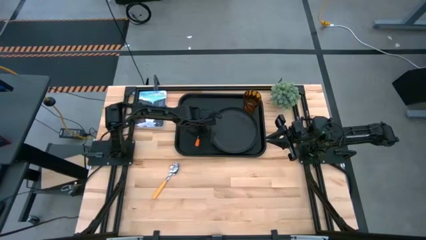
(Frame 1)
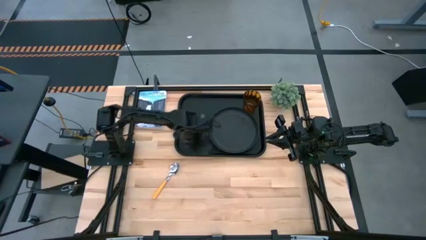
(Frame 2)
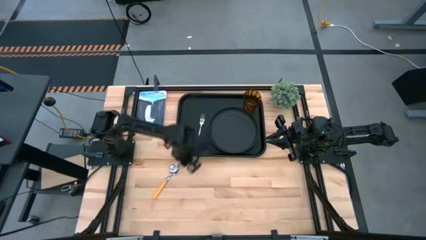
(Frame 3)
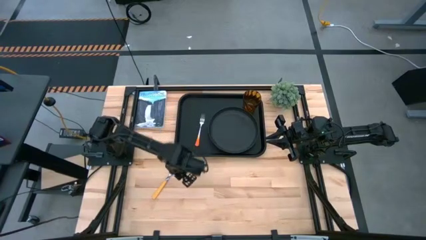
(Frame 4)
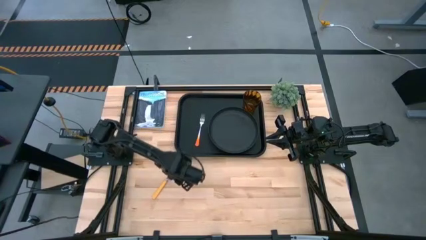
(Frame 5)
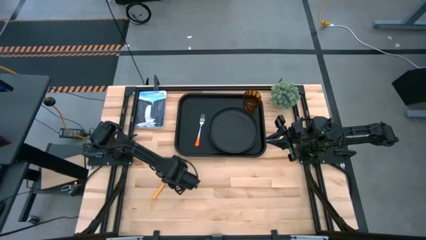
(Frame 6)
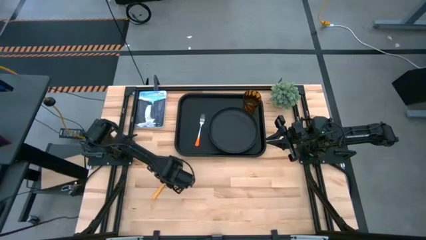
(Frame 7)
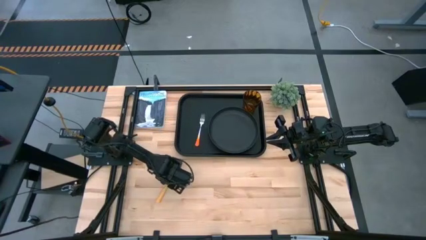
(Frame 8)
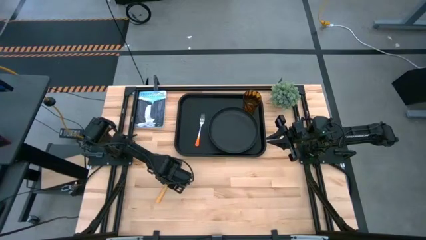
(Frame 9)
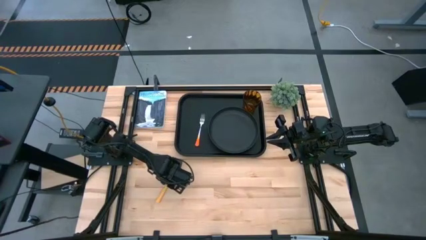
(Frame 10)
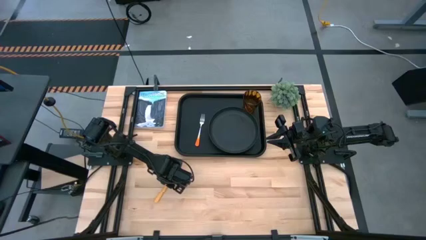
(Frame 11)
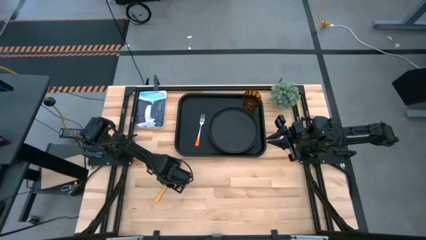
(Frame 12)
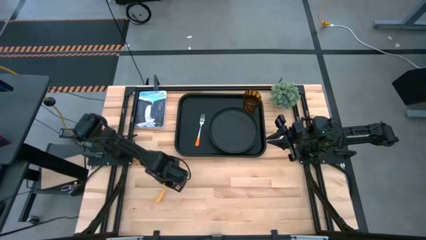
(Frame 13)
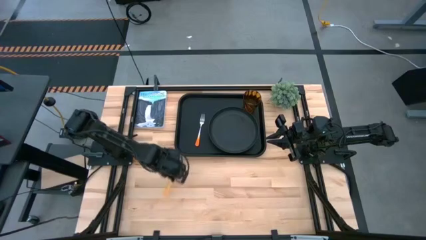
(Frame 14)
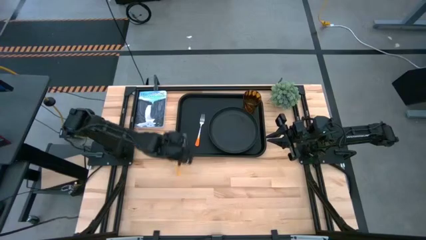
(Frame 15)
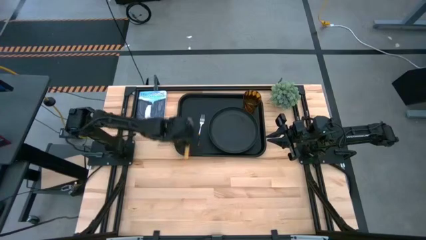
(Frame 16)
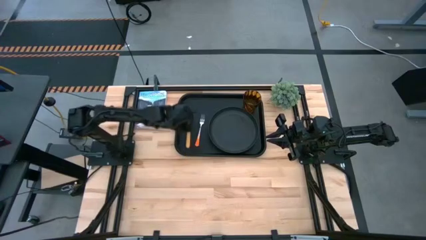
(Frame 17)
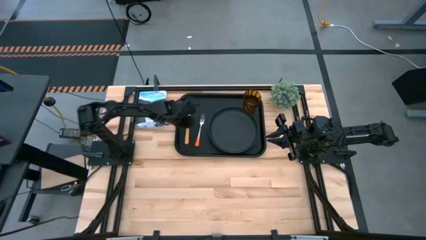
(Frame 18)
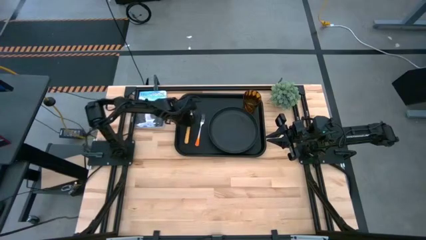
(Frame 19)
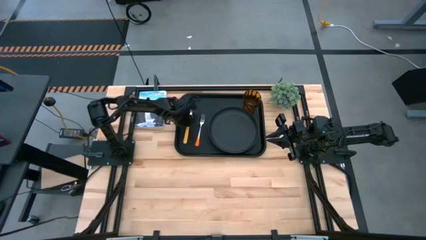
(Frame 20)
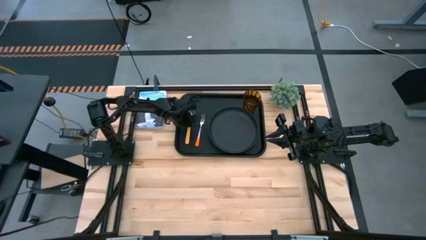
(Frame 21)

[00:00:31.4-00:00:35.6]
Task: Pick and place plate/cup/fork/spoon on tray
Put the yellow spoon to the left of the orange fork

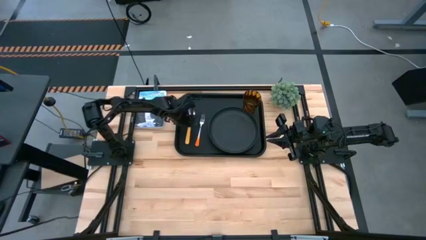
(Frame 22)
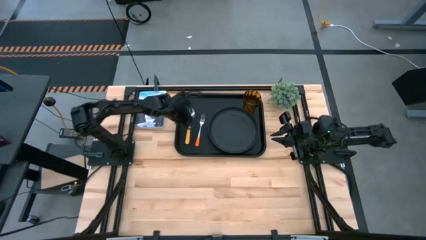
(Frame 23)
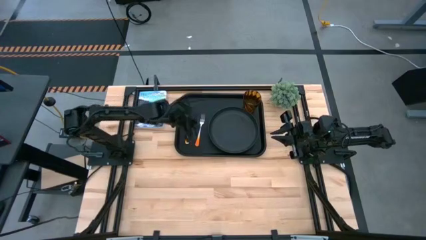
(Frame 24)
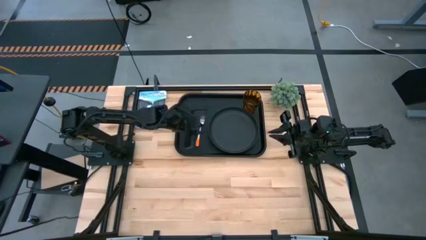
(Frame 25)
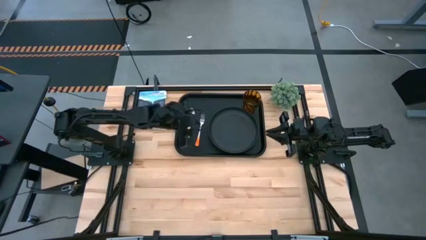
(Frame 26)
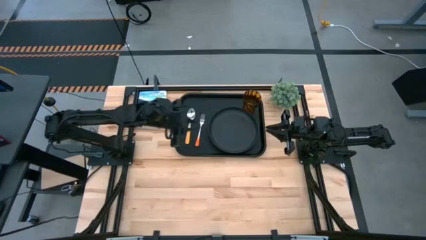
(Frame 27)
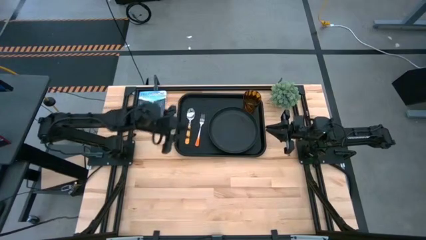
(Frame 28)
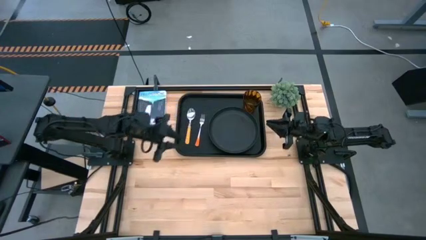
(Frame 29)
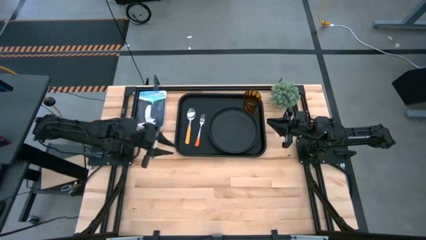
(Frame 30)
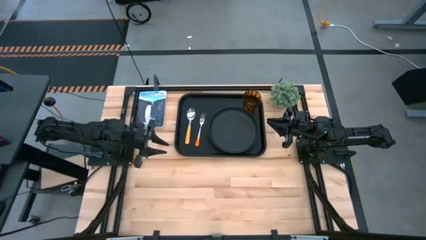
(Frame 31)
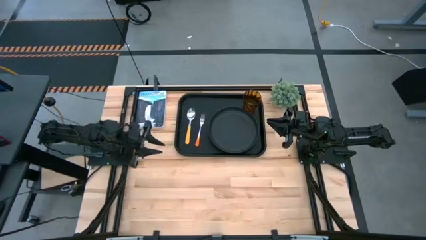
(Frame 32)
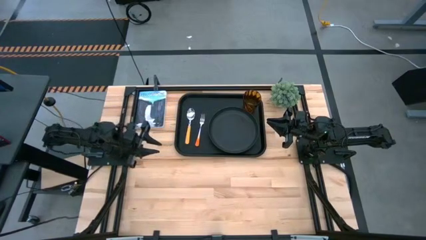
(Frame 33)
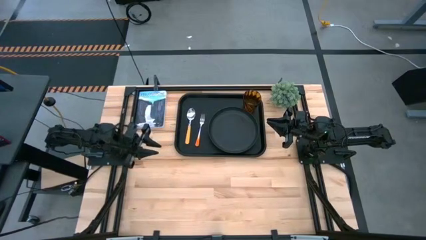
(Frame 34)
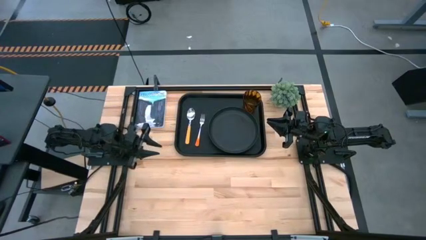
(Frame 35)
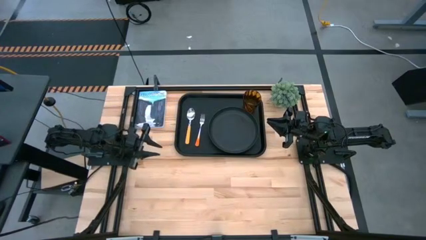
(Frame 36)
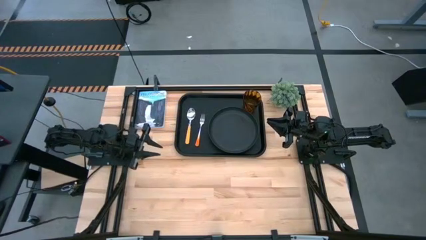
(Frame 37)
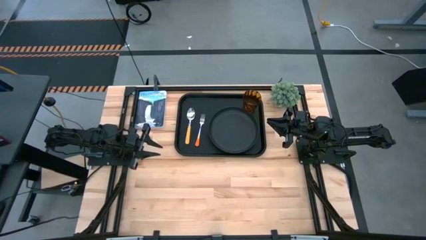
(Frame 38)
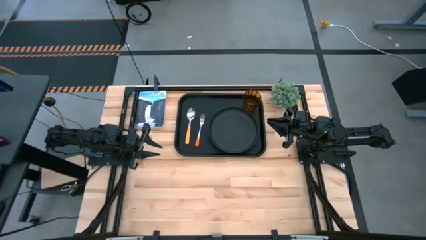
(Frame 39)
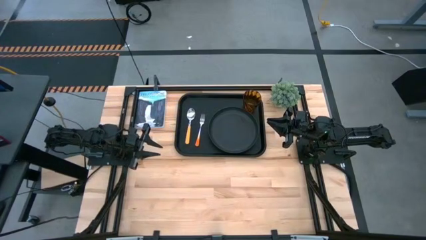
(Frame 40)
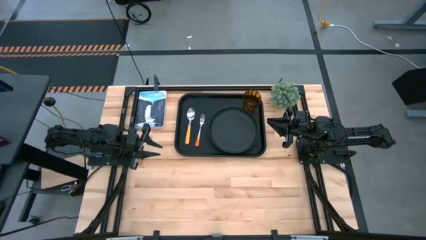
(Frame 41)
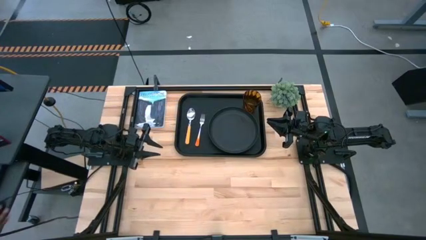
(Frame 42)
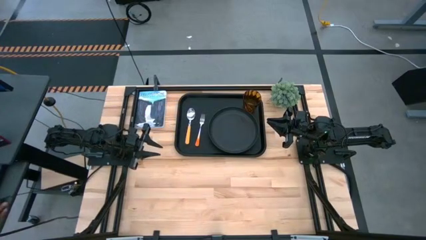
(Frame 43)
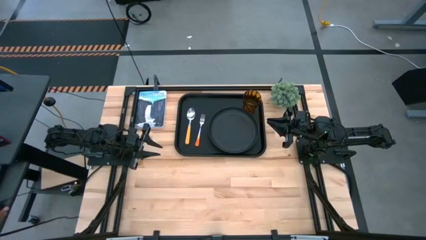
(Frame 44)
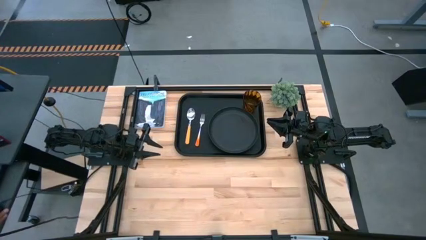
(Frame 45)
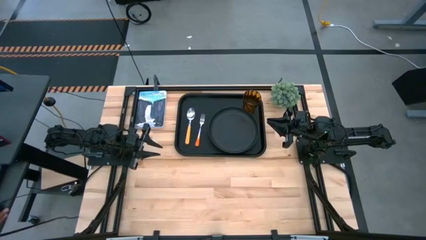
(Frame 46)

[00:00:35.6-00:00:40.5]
Return to Home Position

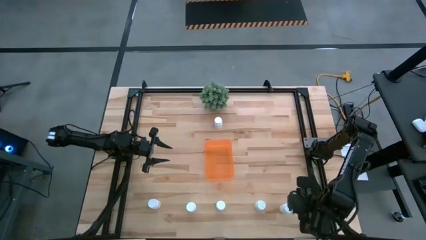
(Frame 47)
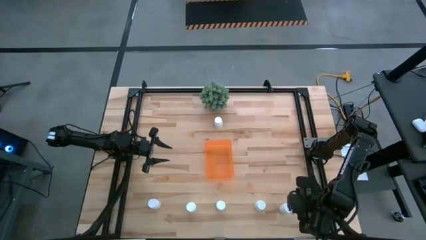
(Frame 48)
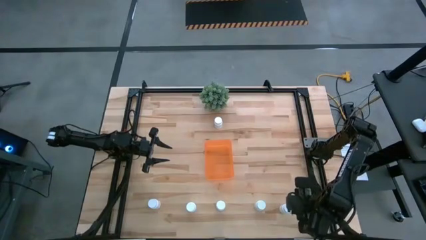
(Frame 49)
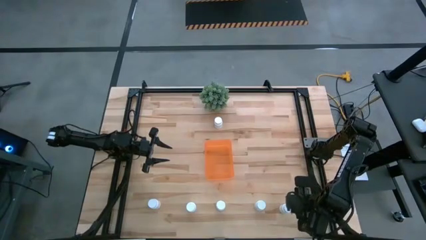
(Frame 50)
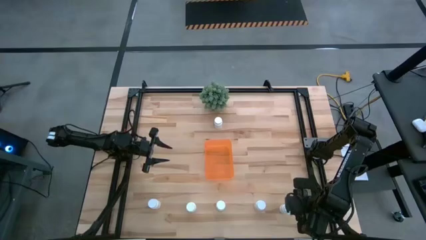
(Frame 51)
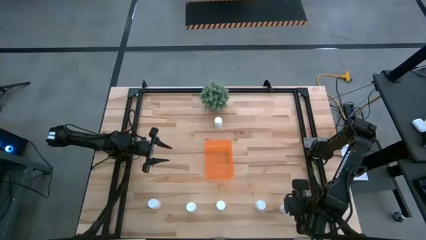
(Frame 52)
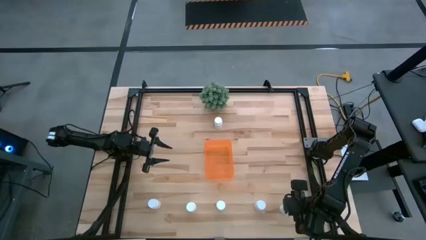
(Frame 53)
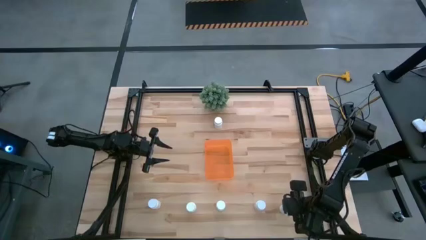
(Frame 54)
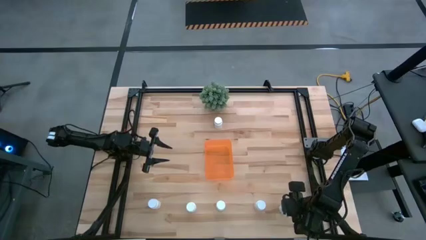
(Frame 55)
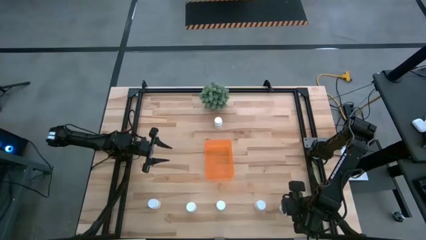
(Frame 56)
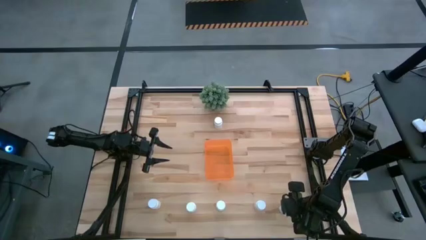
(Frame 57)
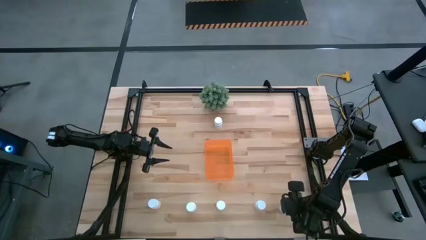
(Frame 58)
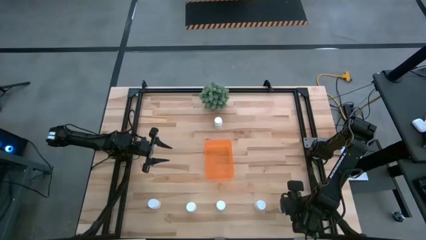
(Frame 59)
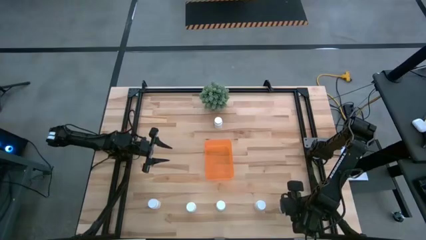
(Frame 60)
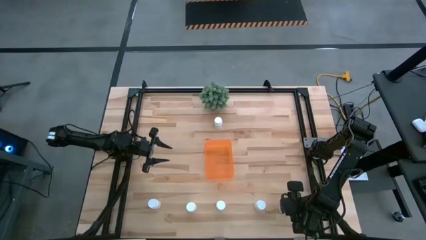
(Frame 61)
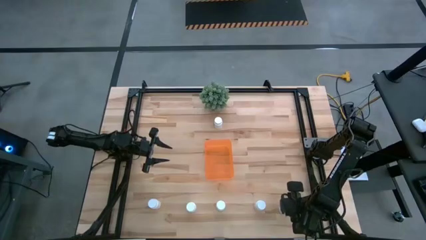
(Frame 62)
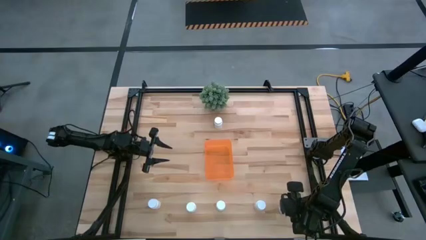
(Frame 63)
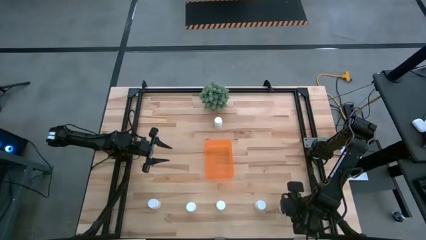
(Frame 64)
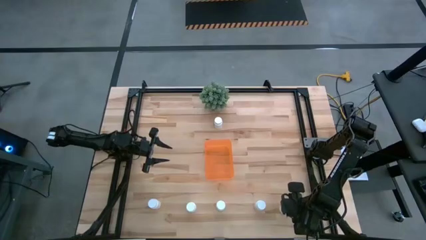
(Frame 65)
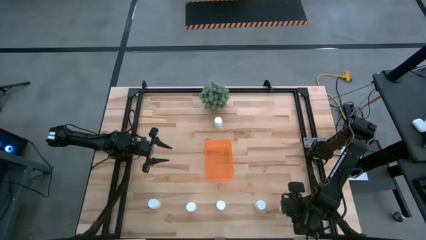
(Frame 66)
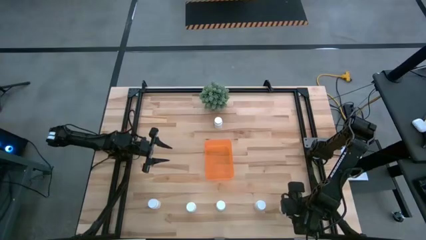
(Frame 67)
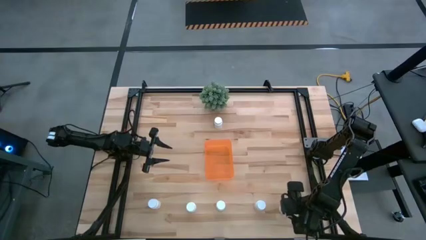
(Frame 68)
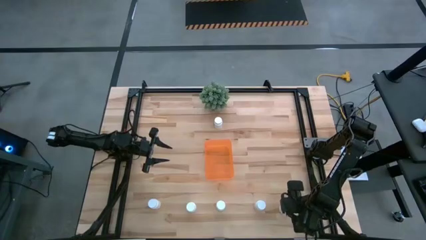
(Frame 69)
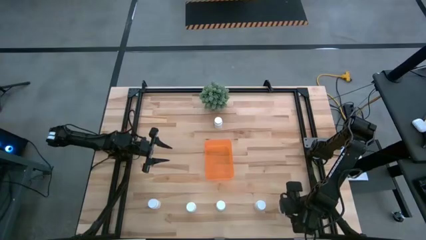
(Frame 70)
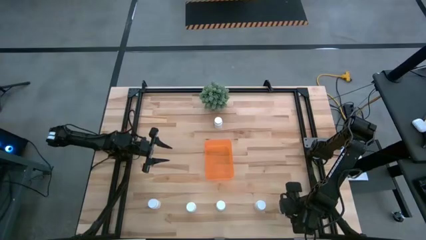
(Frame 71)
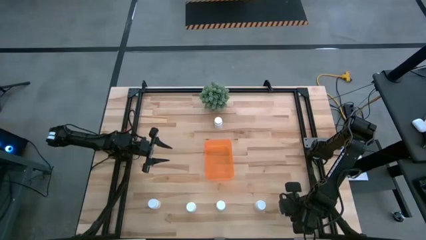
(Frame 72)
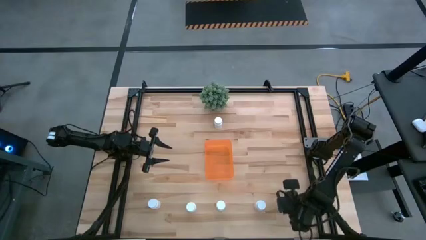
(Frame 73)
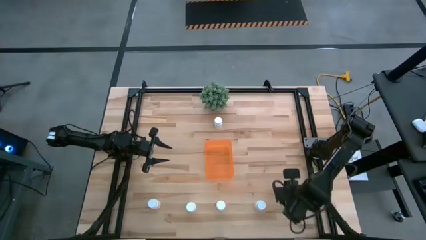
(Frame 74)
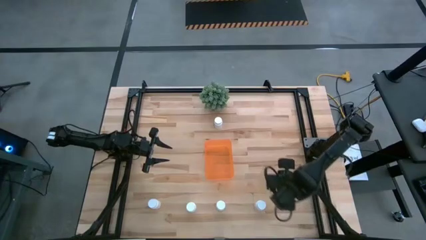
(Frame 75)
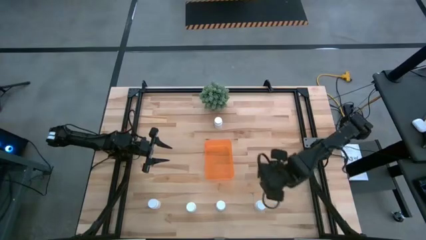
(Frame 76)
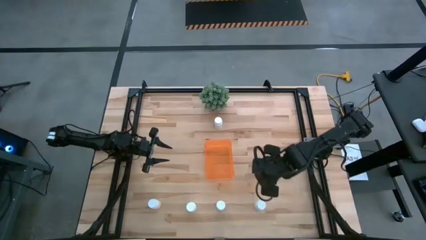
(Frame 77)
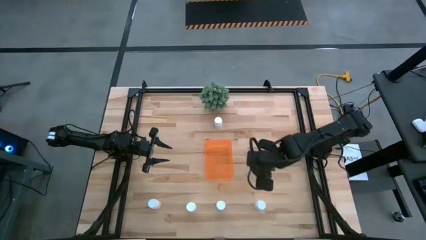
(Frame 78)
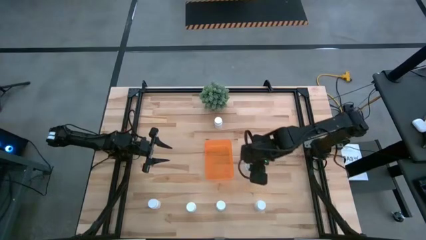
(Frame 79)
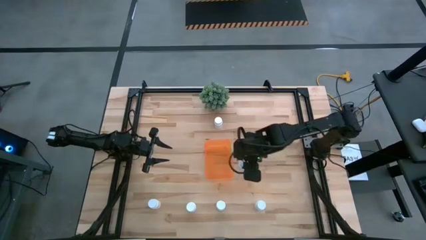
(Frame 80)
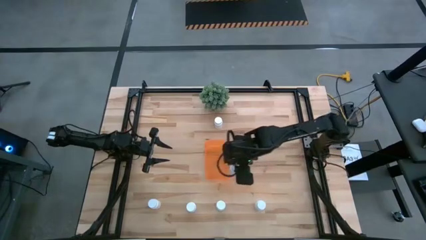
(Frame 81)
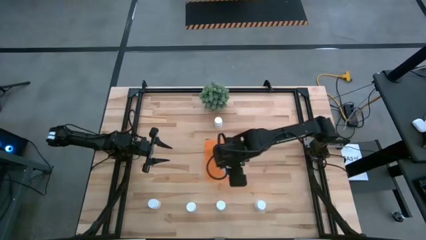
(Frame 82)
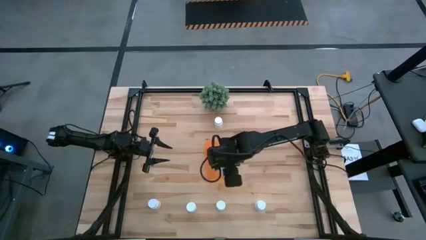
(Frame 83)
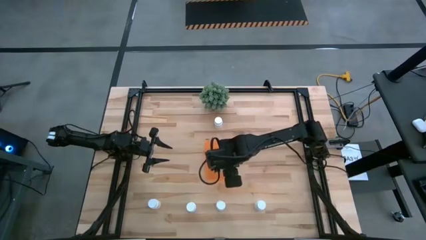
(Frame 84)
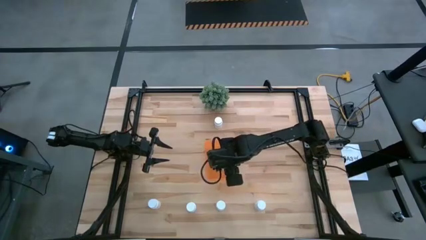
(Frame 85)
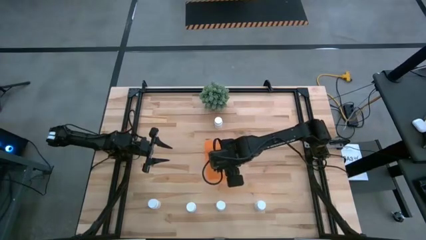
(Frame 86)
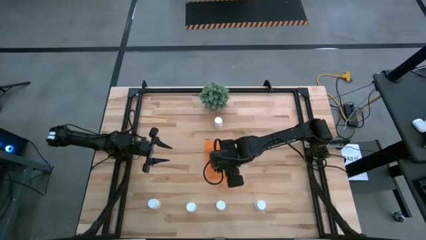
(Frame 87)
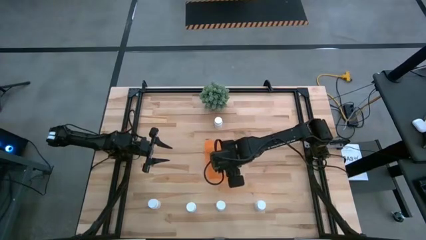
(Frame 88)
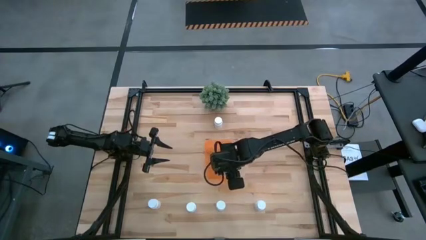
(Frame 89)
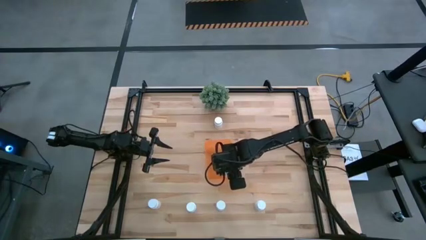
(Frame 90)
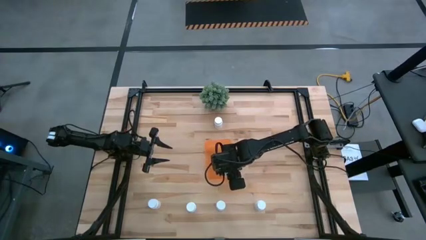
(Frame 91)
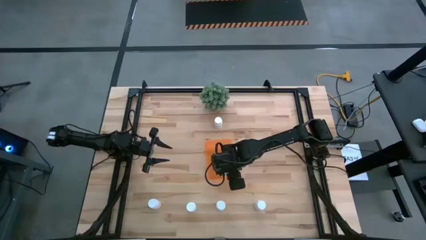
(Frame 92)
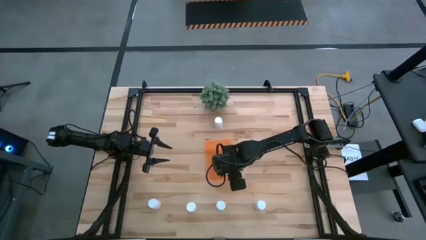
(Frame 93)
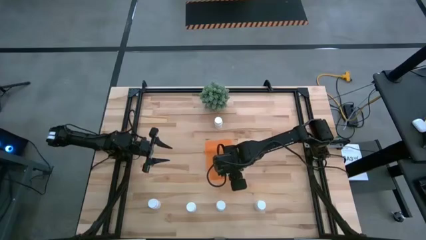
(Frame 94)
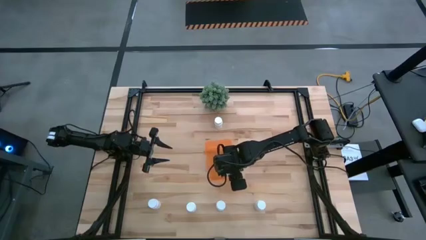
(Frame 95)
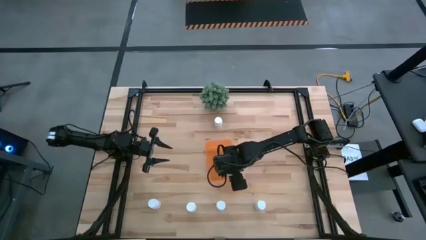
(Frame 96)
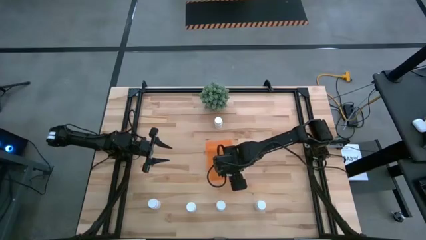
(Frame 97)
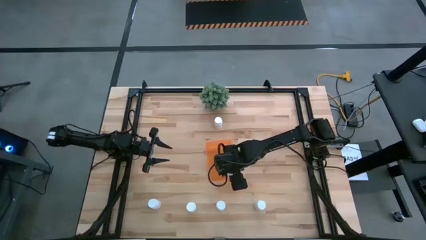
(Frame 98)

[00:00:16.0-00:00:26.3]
Task: Pick and place pill bottles into a basket
Put the white pill bottle into the orange bin
